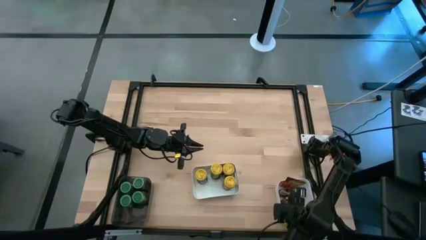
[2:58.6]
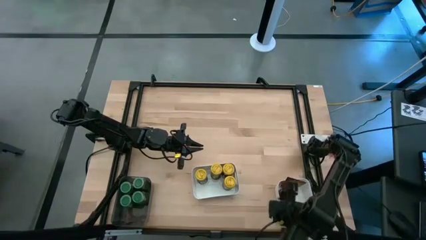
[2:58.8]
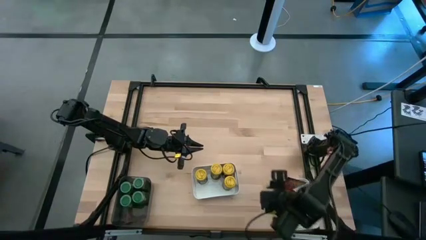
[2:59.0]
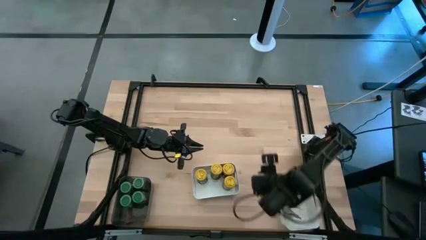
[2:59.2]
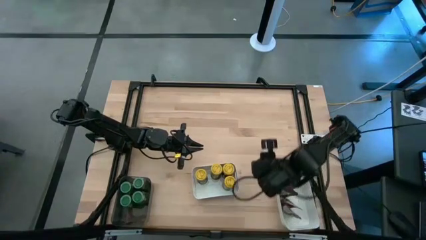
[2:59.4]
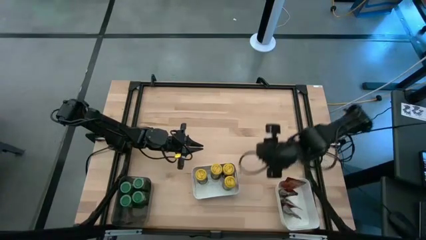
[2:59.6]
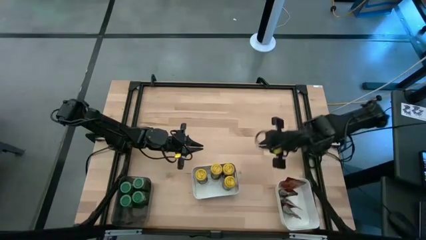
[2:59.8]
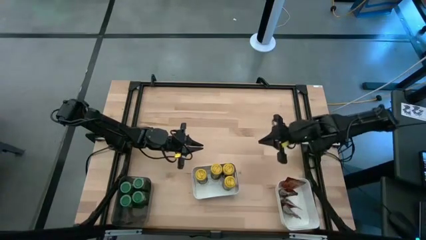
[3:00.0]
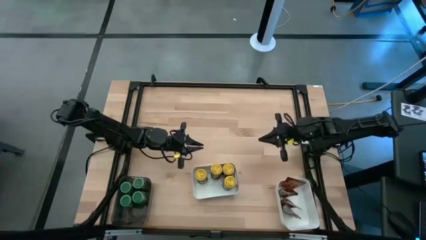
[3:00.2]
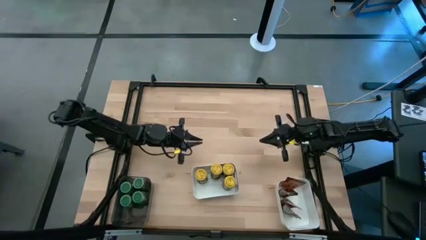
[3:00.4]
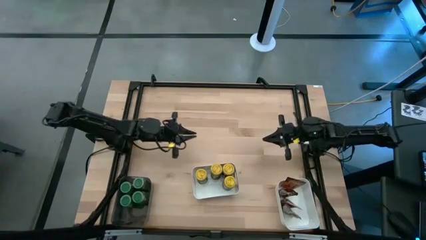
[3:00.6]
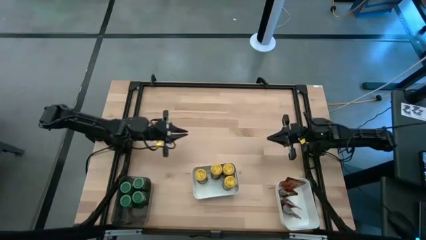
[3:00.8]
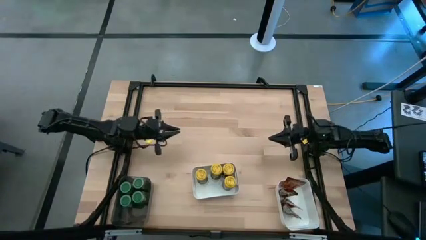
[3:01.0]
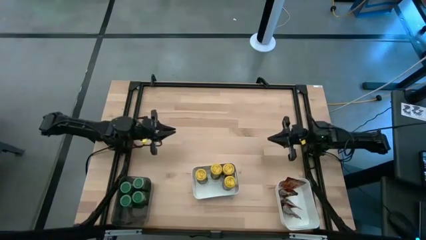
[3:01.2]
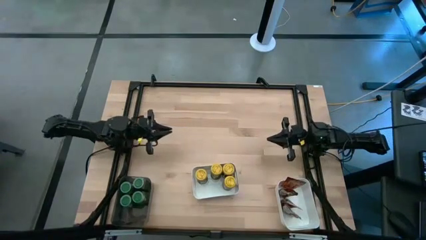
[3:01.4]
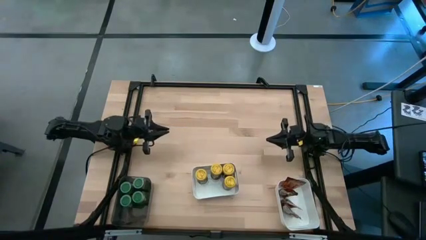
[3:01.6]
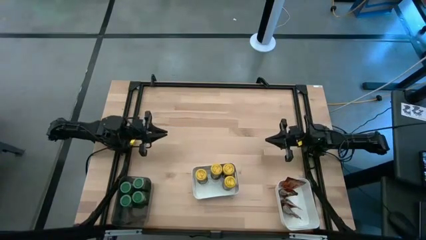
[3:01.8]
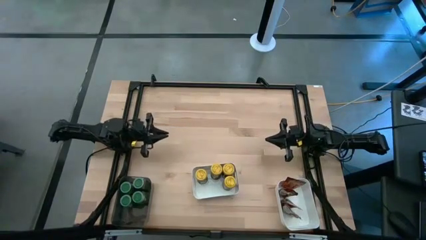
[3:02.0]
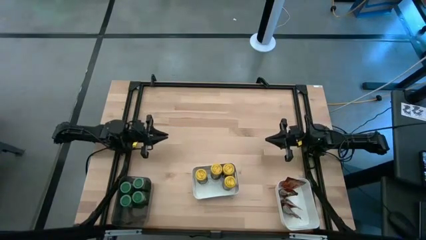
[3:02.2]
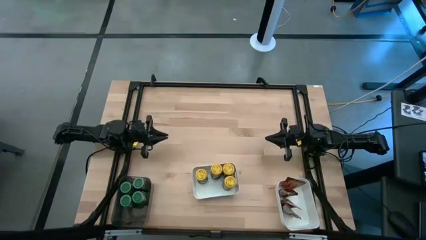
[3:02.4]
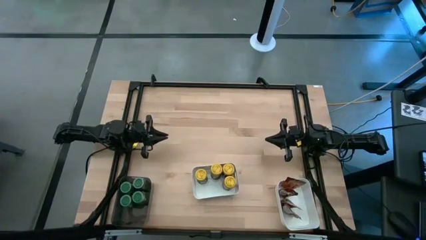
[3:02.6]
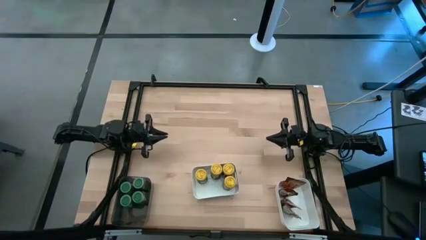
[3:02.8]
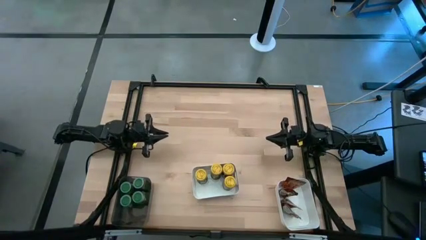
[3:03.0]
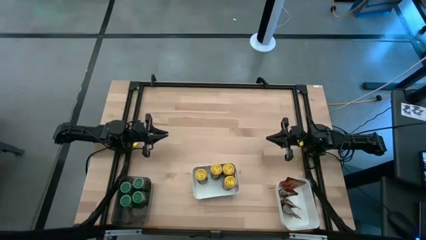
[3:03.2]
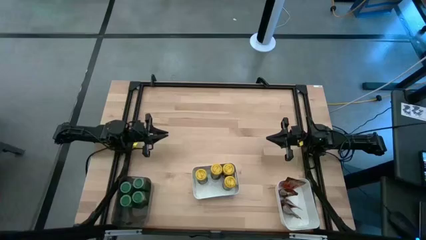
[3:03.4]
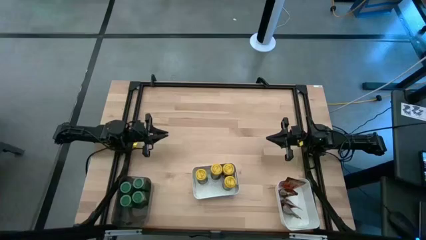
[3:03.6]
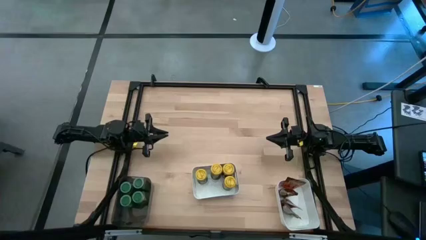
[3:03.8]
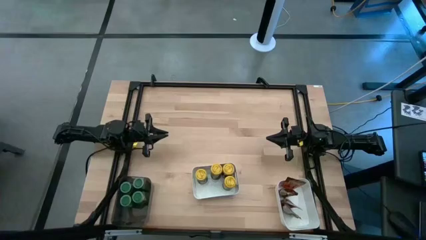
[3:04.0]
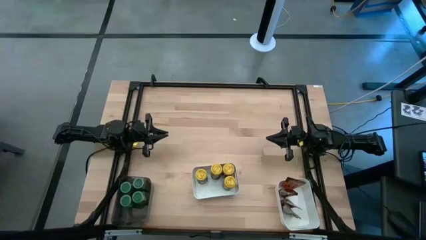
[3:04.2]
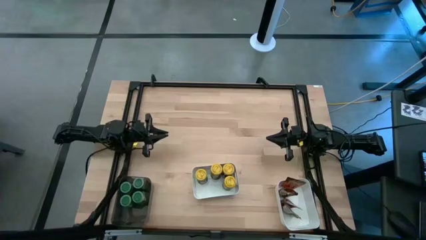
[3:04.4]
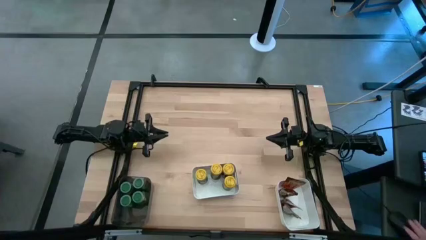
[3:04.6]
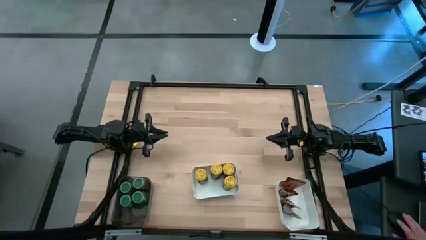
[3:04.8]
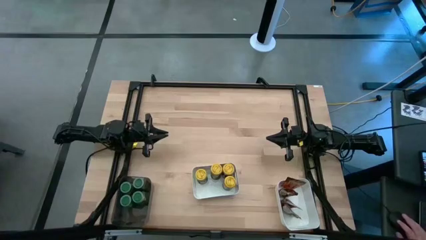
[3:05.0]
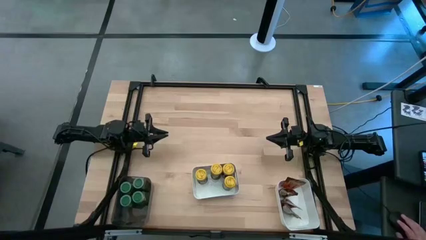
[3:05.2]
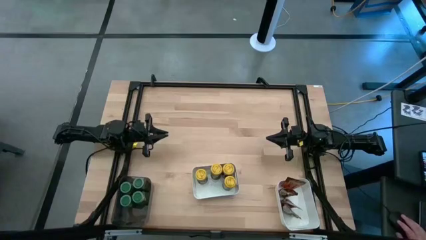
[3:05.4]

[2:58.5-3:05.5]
Task: Sort spices by type
Return to Home Position

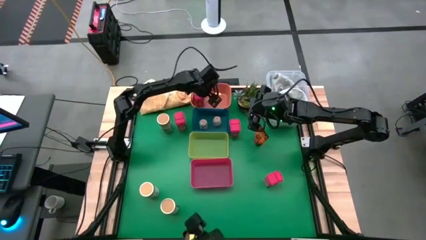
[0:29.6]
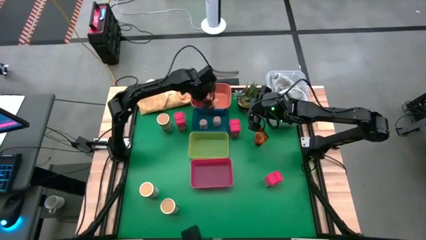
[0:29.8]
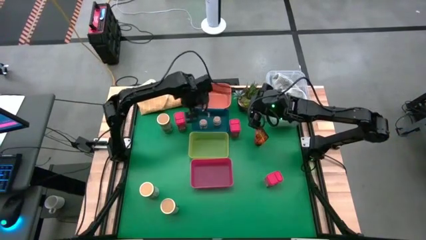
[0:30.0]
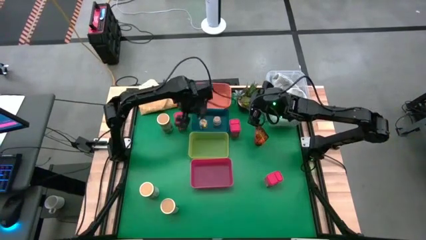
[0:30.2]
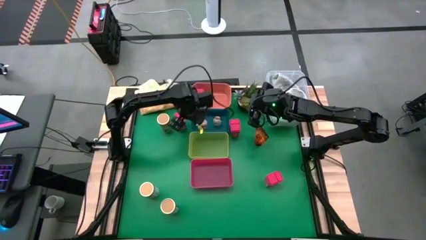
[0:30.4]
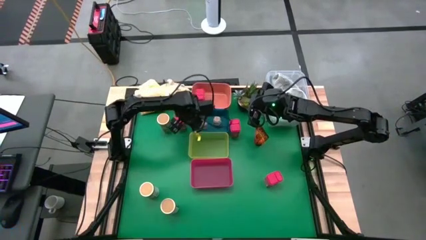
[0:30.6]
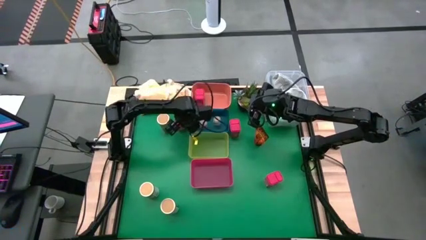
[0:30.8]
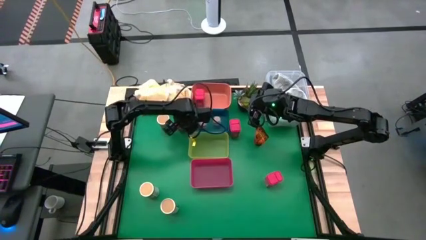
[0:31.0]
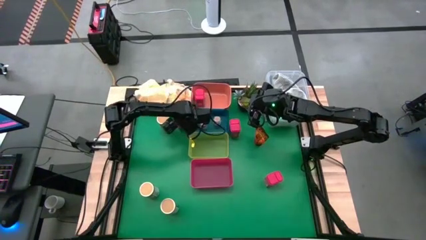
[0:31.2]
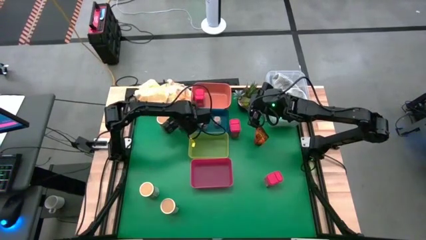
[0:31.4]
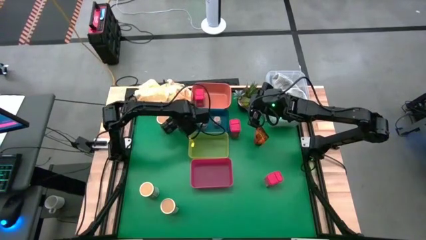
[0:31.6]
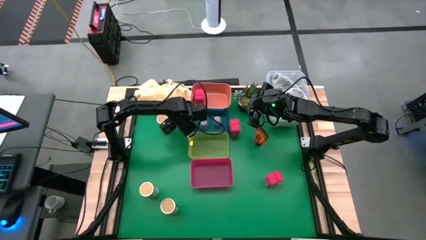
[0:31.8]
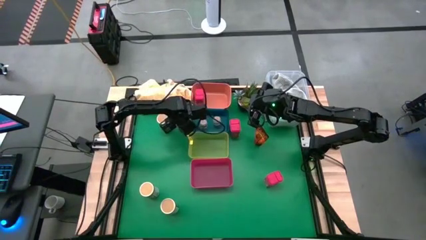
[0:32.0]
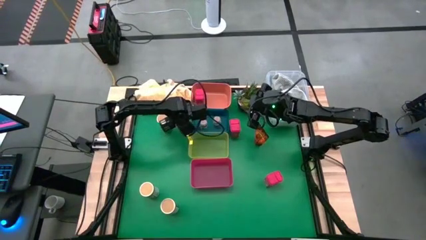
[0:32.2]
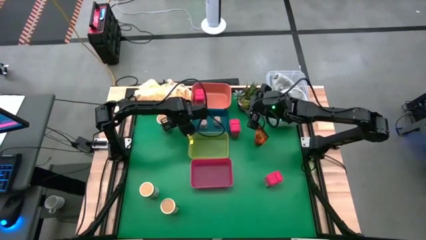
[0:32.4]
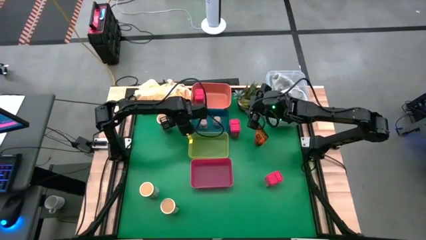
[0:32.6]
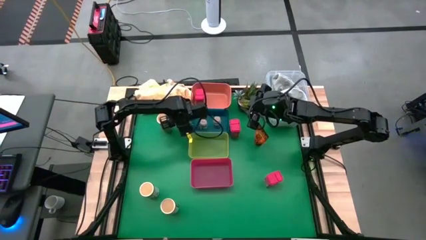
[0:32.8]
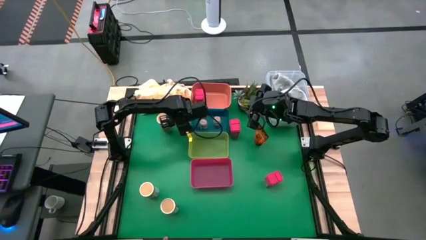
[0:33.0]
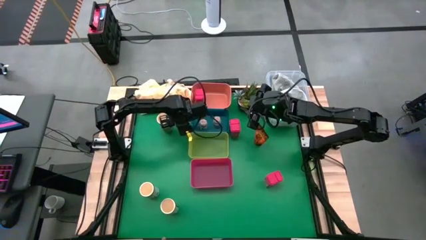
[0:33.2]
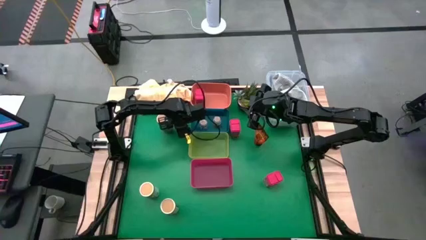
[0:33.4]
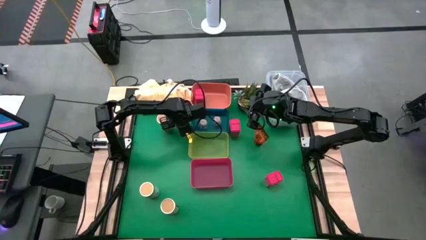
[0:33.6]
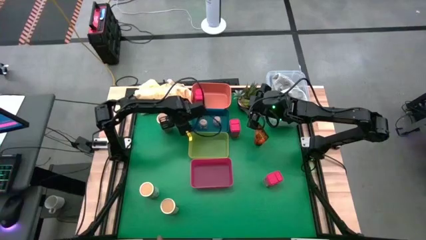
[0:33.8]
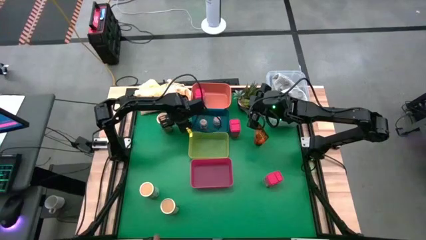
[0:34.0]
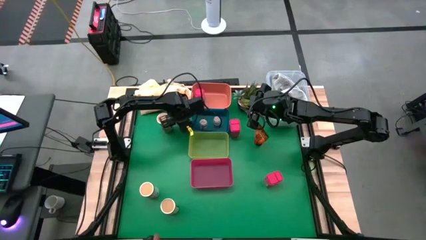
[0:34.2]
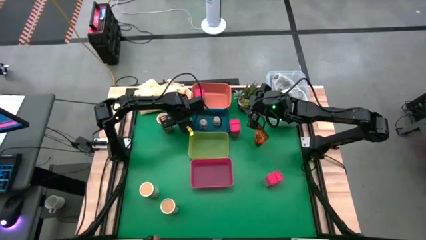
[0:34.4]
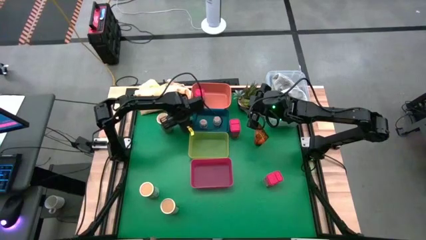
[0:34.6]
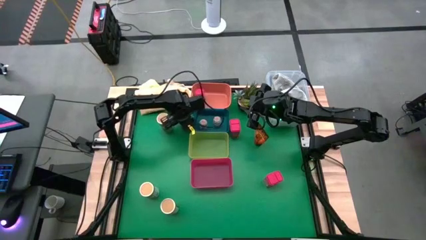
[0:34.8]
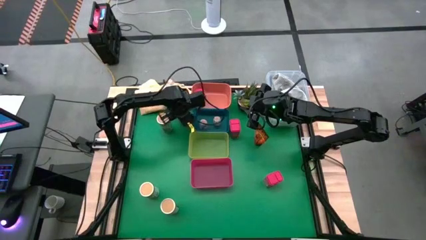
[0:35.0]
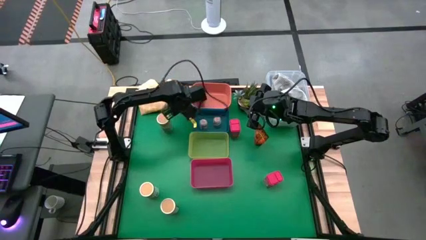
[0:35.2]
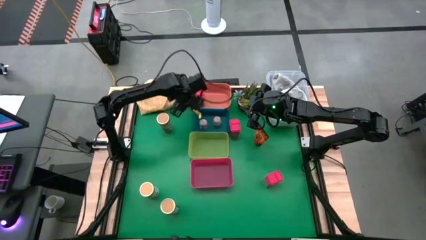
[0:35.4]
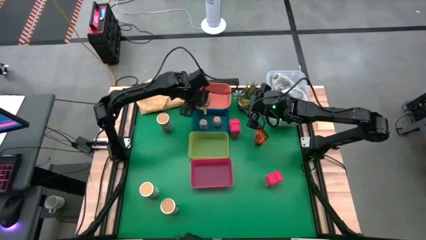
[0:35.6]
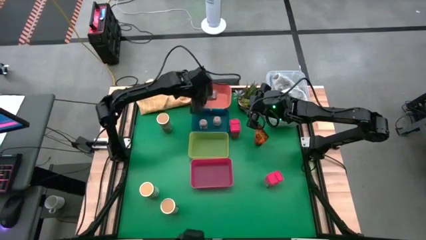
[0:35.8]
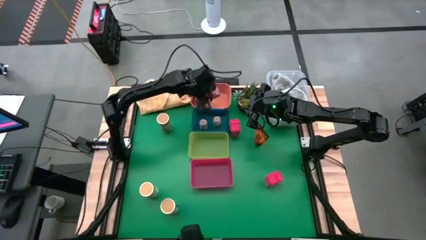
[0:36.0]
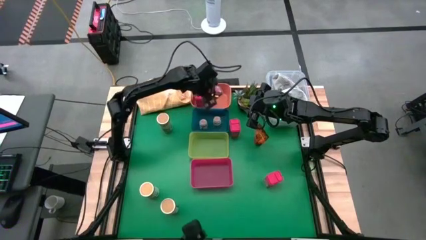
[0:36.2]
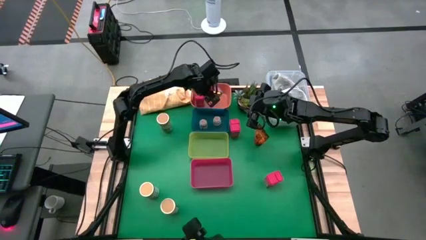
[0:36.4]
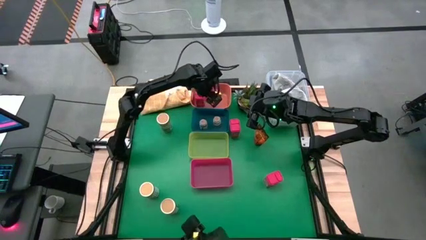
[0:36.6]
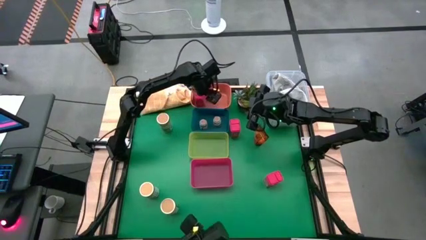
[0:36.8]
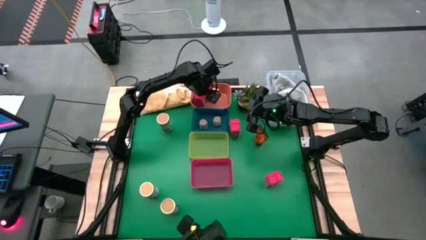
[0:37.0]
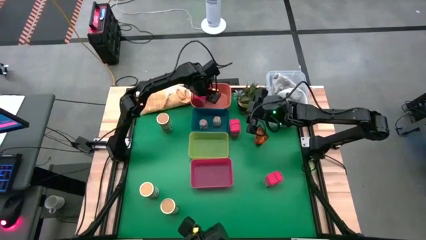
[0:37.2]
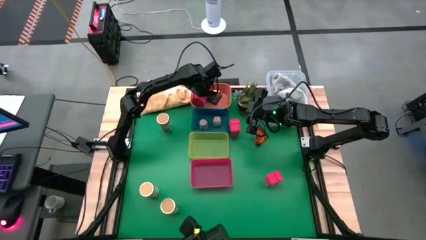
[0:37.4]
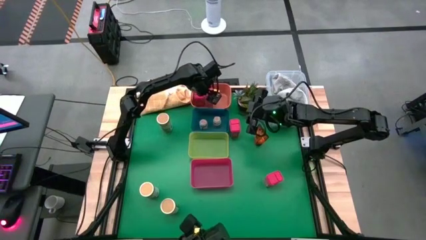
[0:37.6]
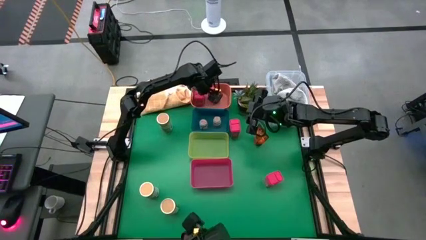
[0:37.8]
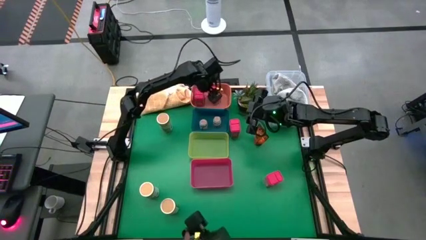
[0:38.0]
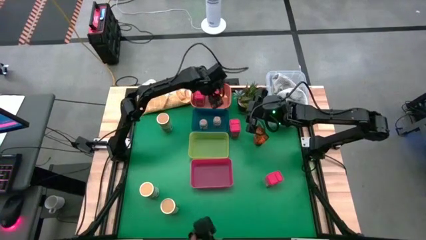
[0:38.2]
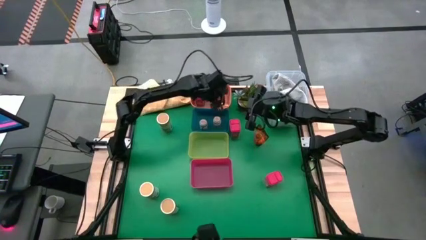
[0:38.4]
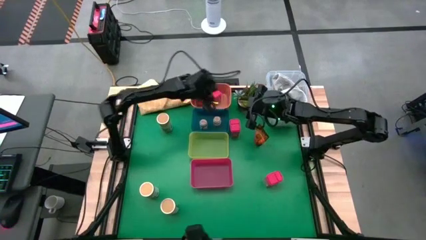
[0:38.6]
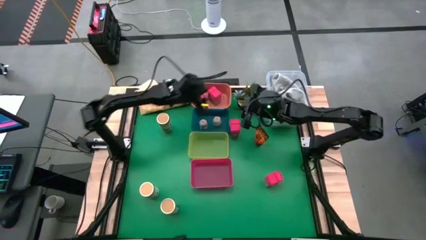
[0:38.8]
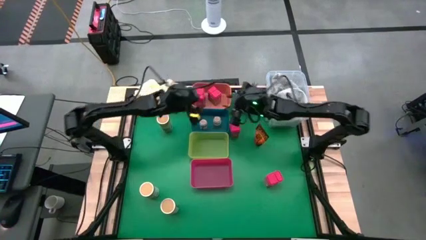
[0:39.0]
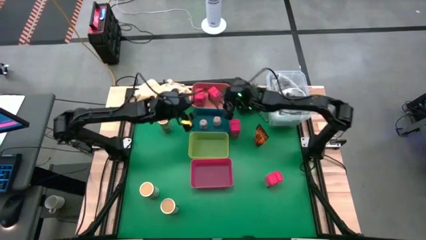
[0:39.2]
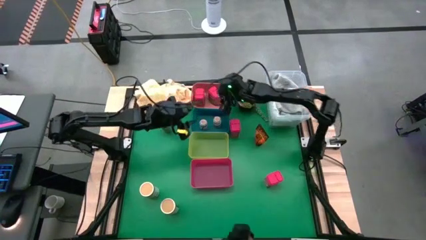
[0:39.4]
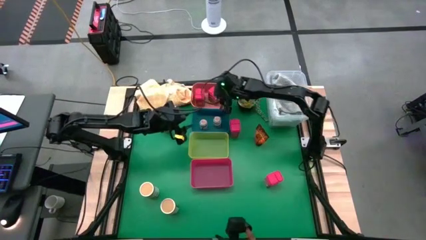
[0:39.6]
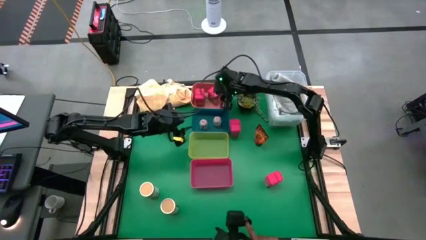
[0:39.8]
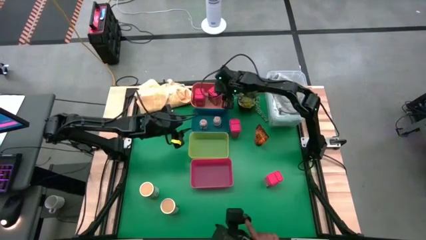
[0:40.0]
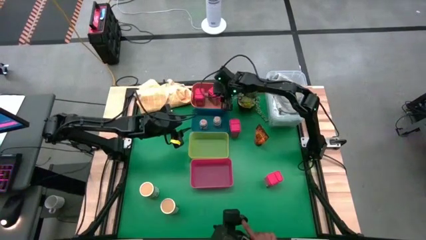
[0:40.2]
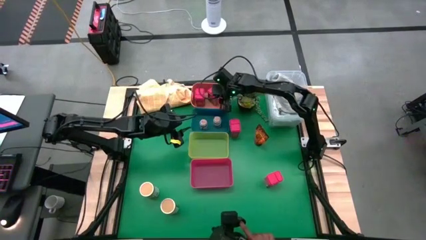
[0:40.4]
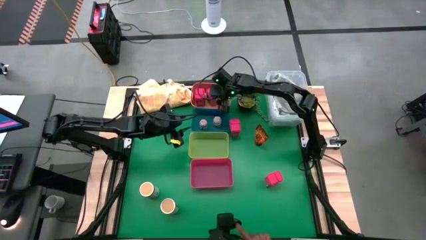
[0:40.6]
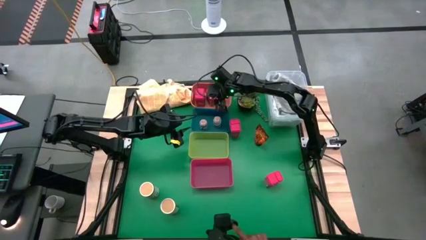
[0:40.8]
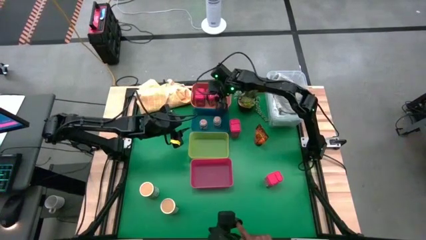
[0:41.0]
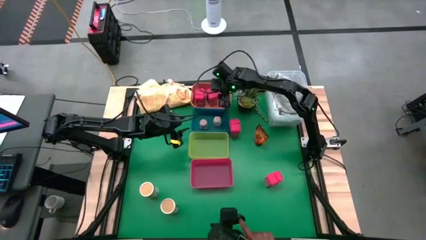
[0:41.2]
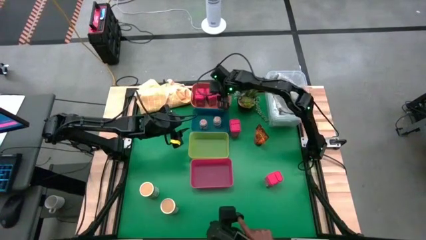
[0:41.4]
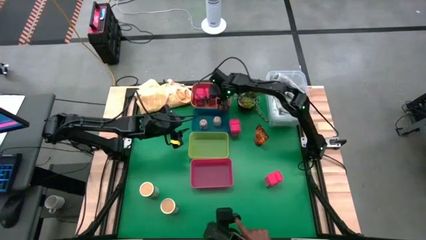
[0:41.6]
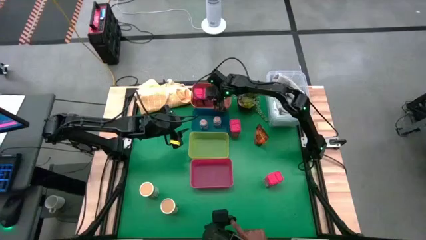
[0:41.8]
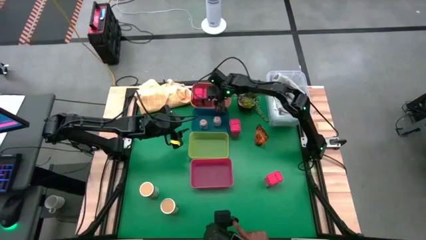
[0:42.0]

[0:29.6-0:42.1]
Task: Sort spices by type
Put the red seasoning can into the orange bin
